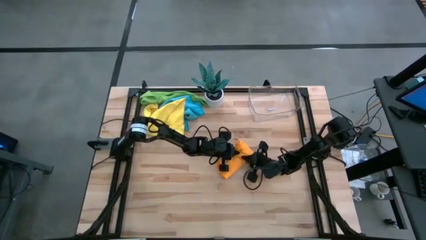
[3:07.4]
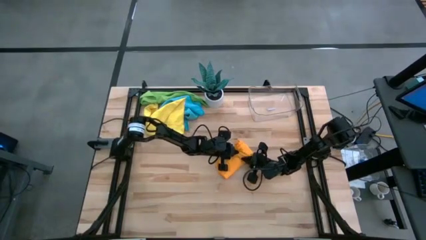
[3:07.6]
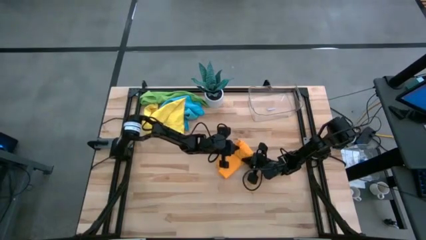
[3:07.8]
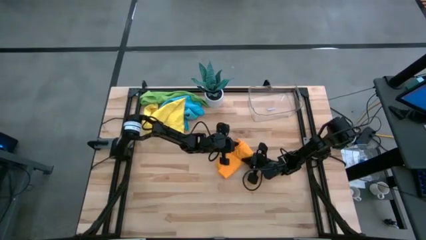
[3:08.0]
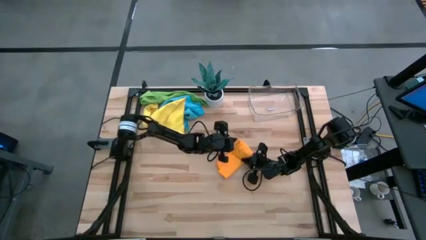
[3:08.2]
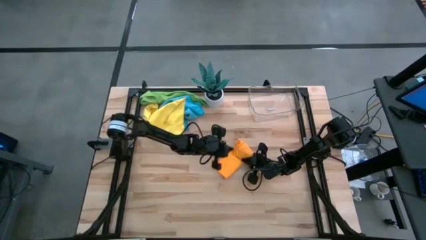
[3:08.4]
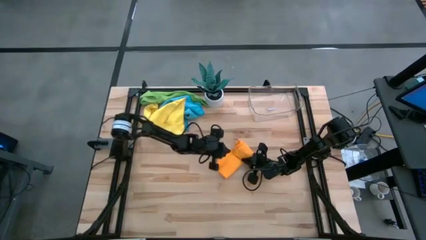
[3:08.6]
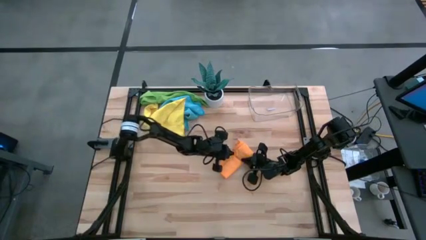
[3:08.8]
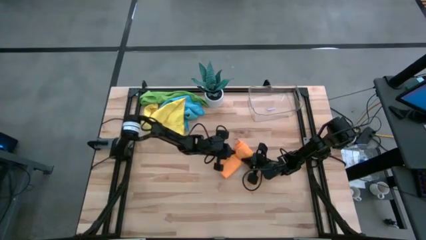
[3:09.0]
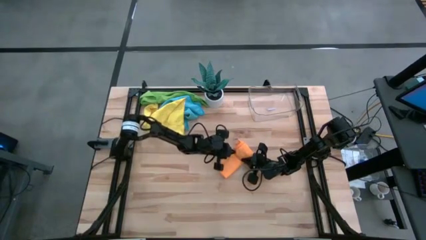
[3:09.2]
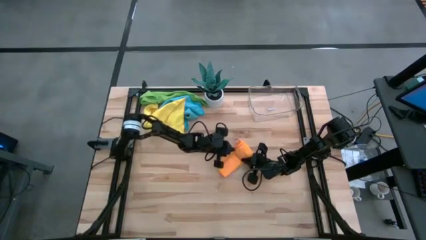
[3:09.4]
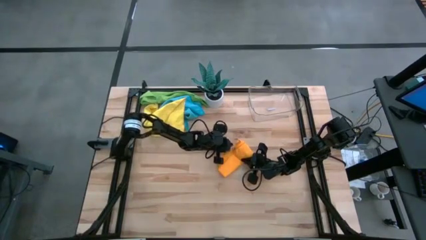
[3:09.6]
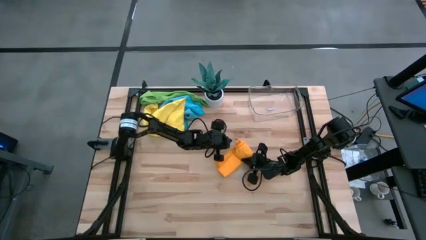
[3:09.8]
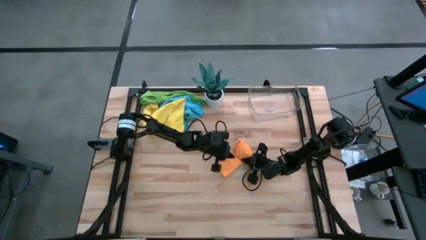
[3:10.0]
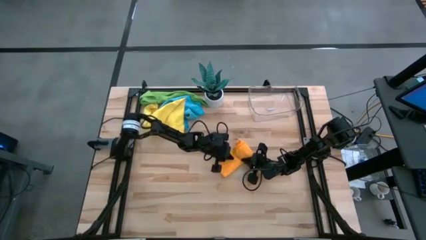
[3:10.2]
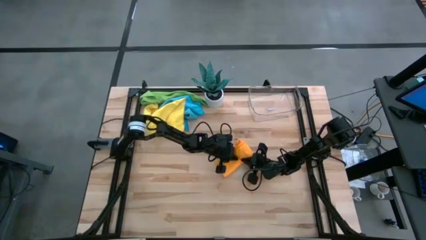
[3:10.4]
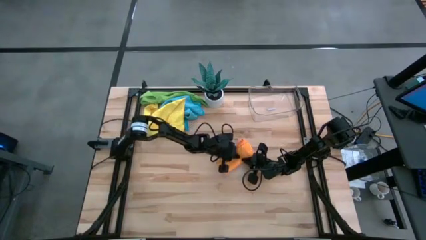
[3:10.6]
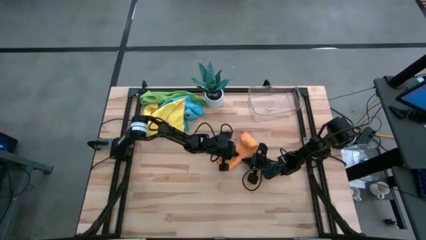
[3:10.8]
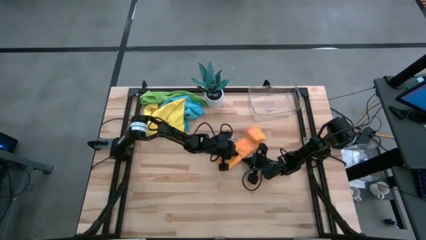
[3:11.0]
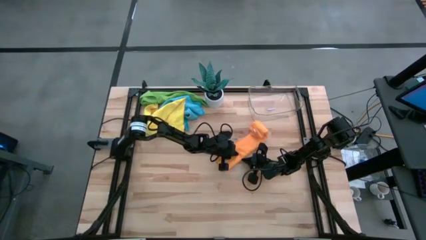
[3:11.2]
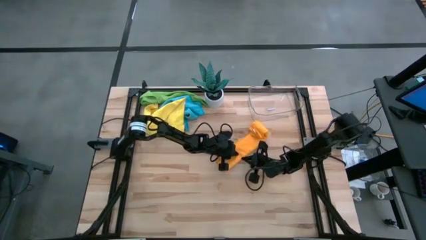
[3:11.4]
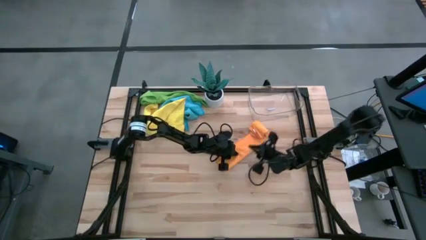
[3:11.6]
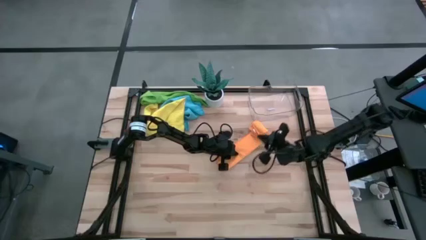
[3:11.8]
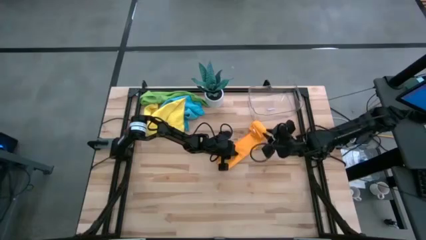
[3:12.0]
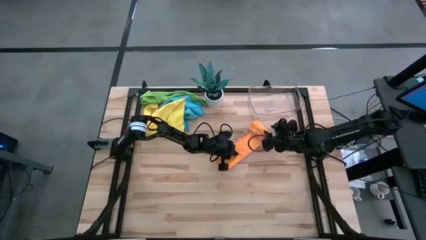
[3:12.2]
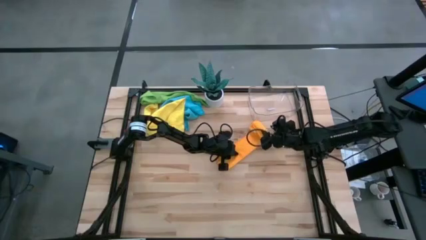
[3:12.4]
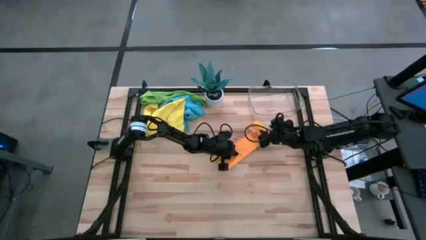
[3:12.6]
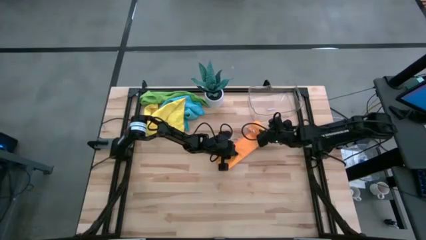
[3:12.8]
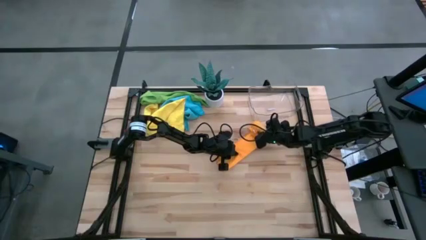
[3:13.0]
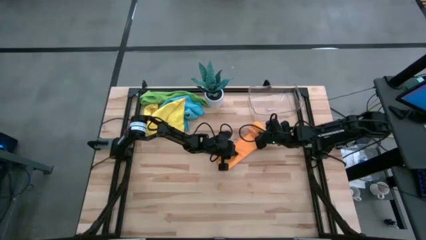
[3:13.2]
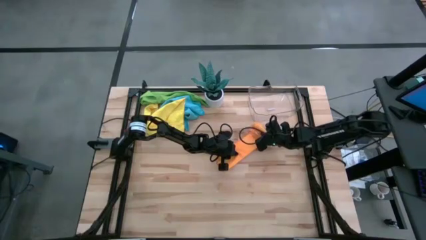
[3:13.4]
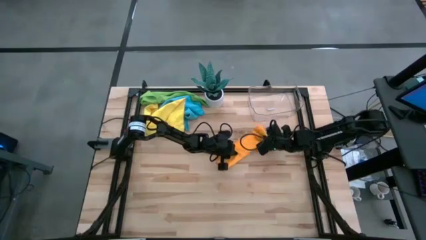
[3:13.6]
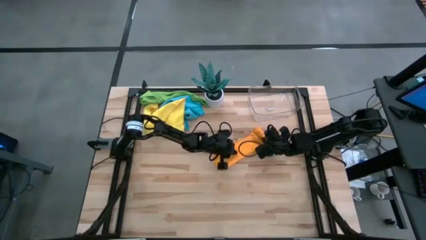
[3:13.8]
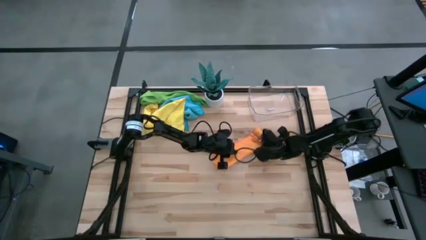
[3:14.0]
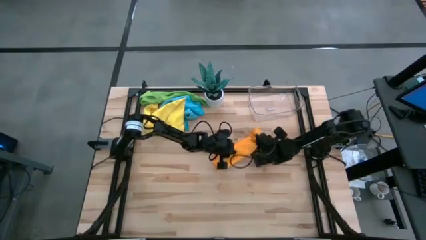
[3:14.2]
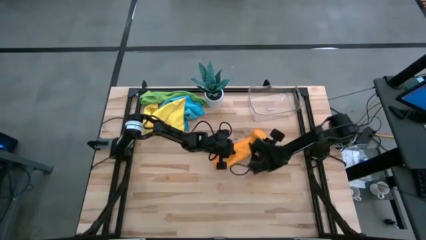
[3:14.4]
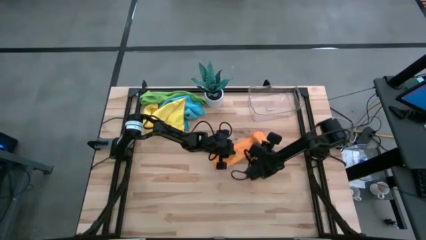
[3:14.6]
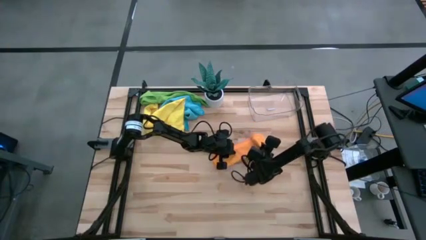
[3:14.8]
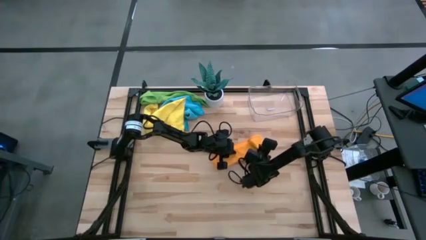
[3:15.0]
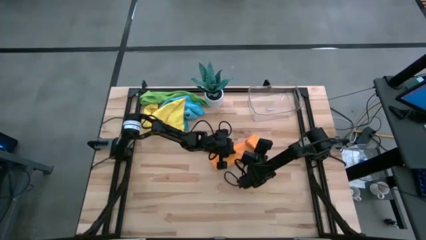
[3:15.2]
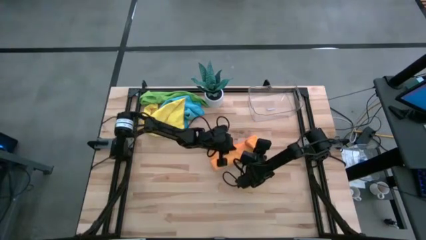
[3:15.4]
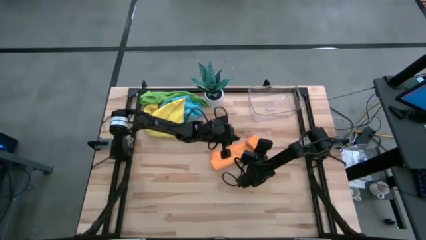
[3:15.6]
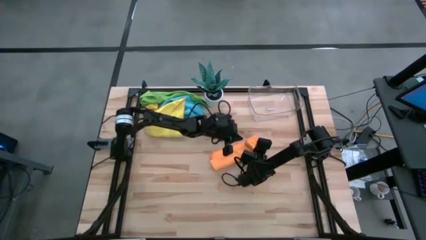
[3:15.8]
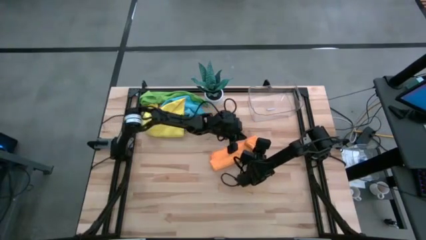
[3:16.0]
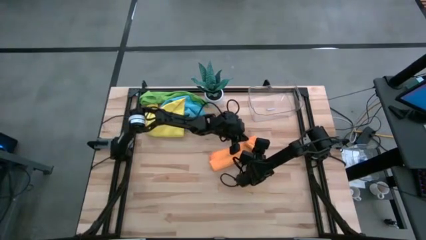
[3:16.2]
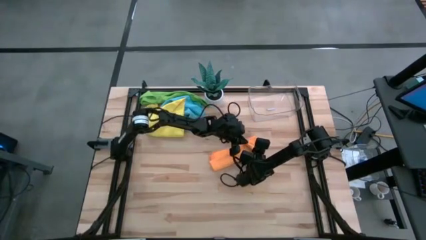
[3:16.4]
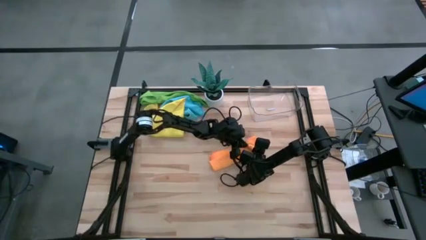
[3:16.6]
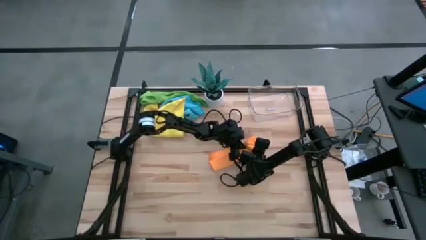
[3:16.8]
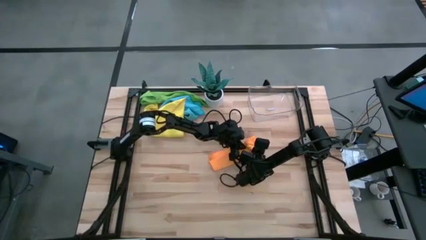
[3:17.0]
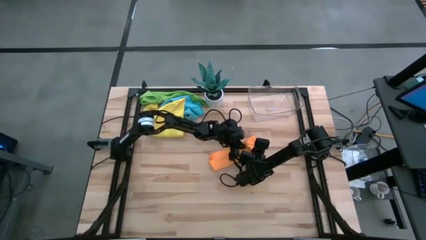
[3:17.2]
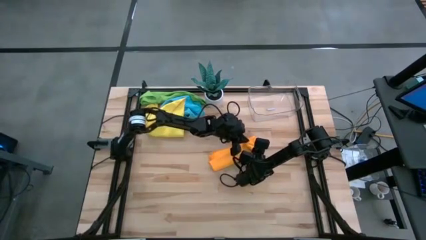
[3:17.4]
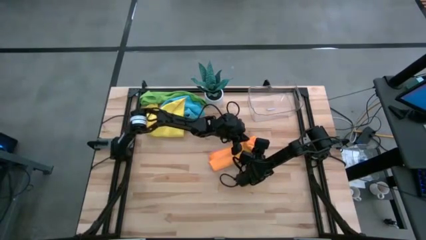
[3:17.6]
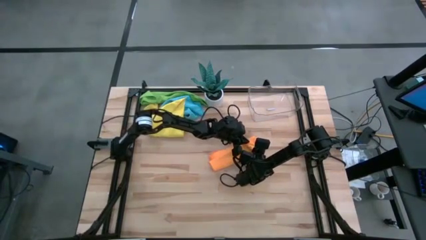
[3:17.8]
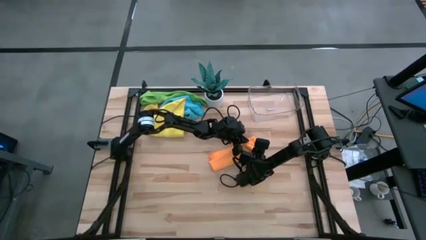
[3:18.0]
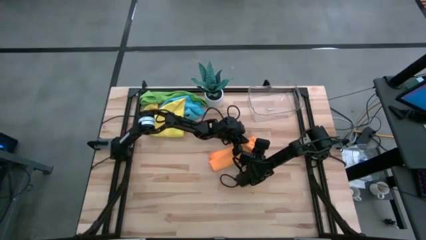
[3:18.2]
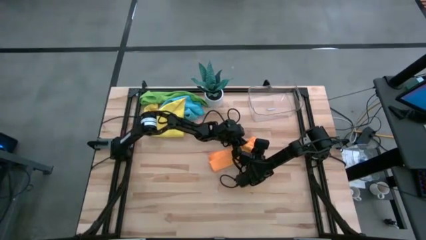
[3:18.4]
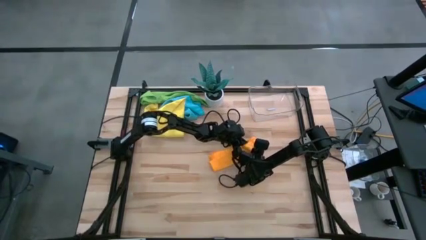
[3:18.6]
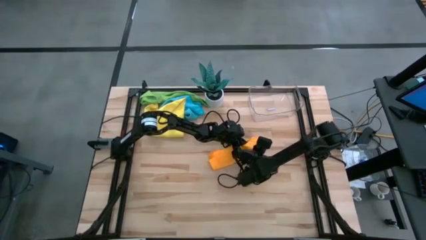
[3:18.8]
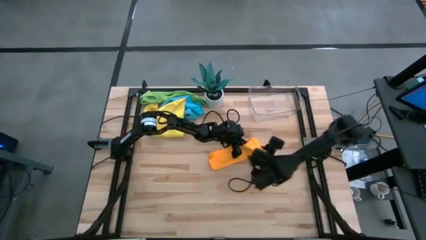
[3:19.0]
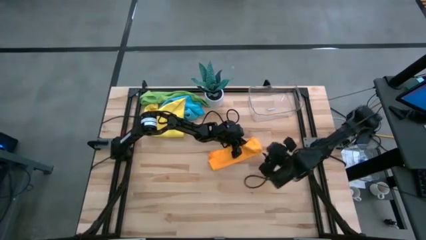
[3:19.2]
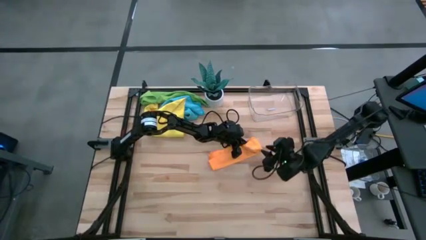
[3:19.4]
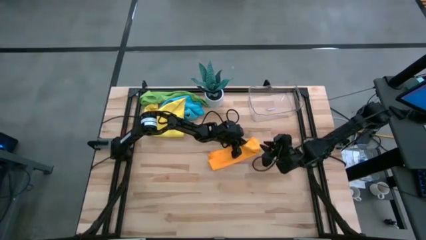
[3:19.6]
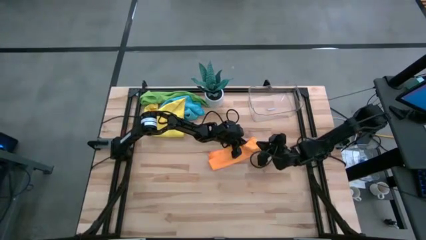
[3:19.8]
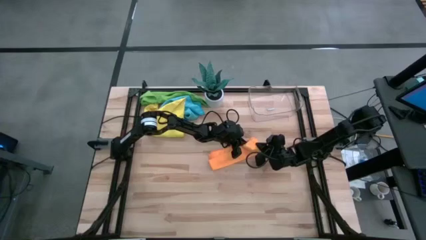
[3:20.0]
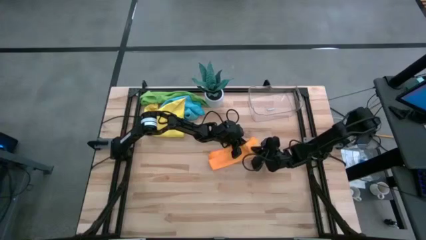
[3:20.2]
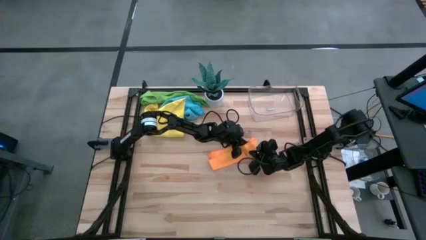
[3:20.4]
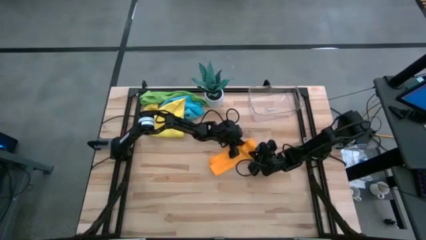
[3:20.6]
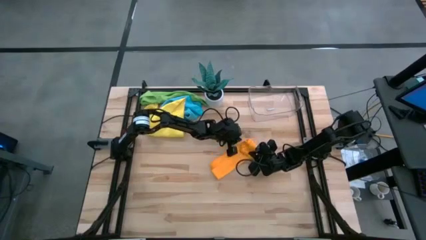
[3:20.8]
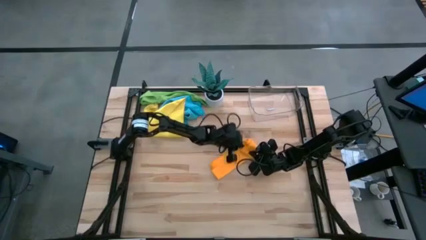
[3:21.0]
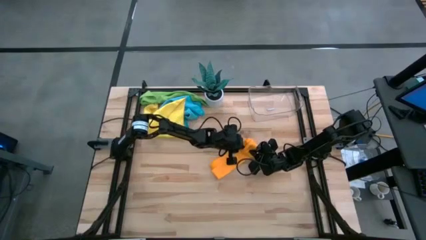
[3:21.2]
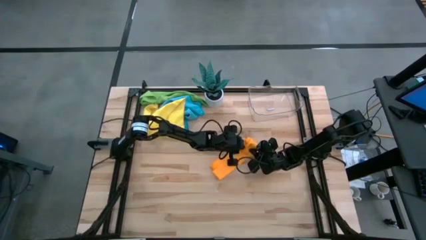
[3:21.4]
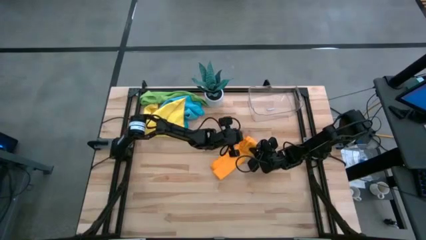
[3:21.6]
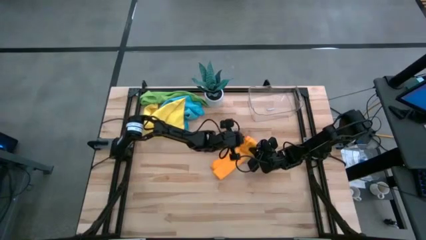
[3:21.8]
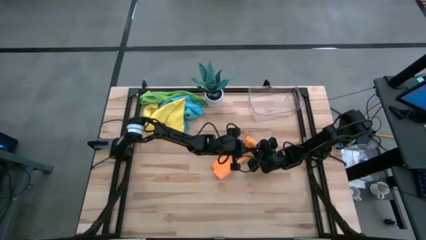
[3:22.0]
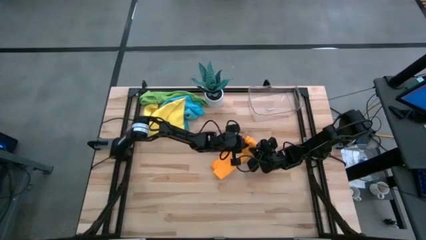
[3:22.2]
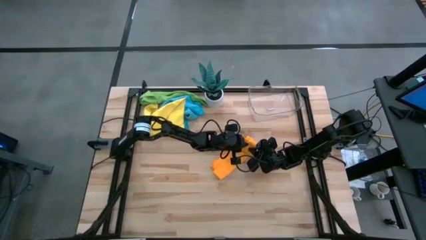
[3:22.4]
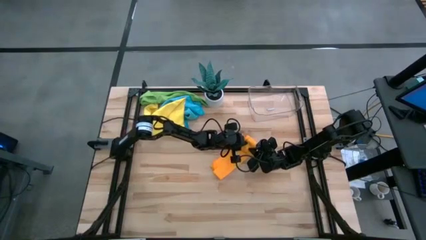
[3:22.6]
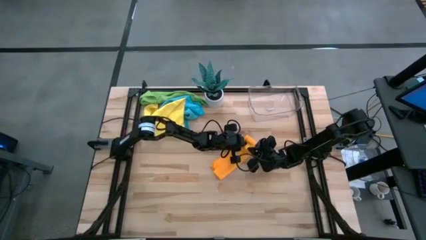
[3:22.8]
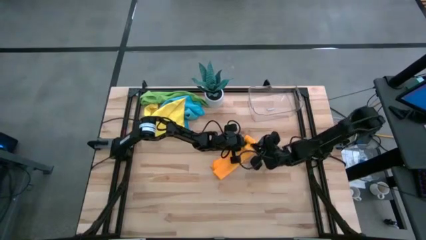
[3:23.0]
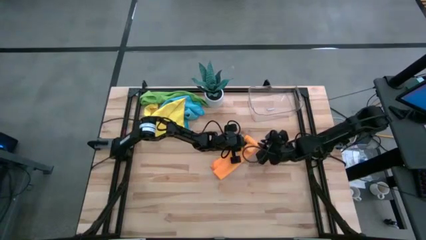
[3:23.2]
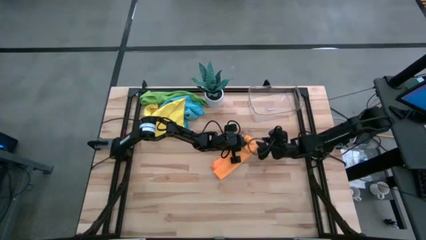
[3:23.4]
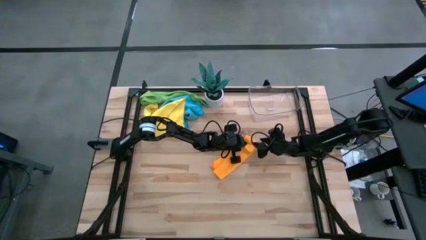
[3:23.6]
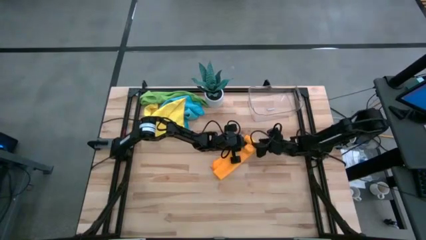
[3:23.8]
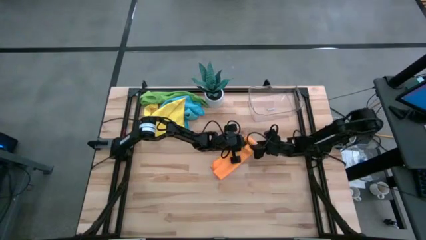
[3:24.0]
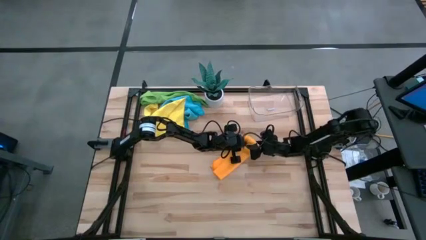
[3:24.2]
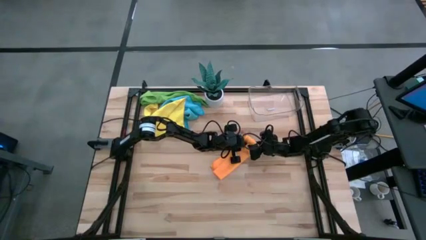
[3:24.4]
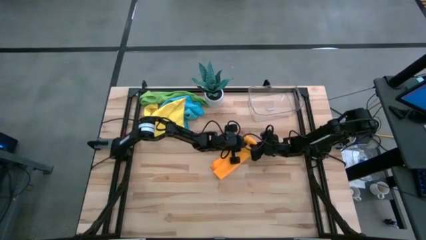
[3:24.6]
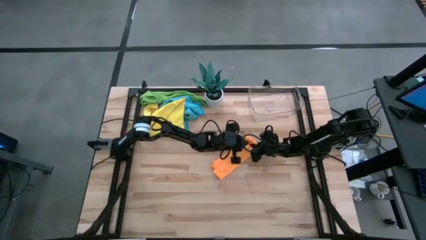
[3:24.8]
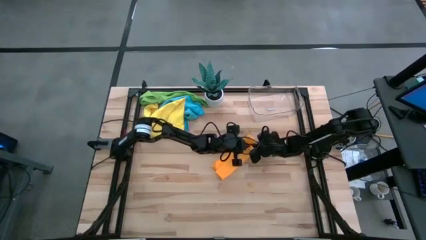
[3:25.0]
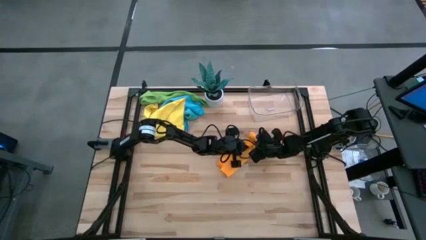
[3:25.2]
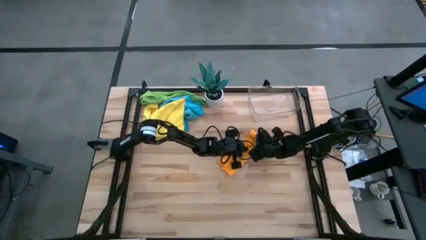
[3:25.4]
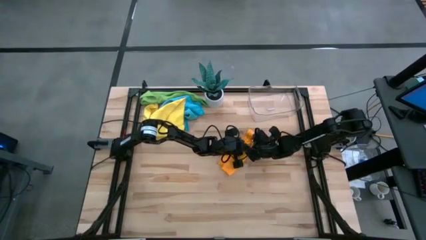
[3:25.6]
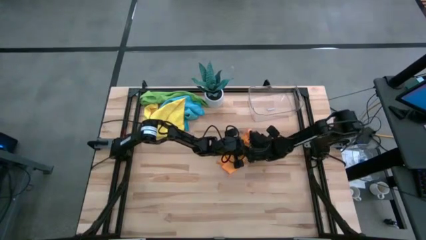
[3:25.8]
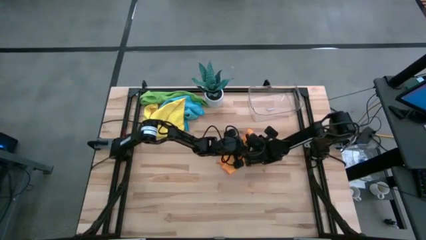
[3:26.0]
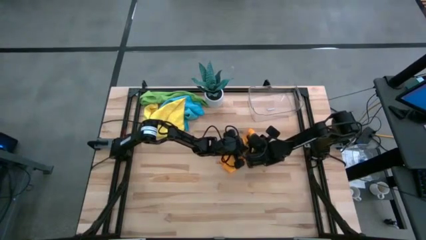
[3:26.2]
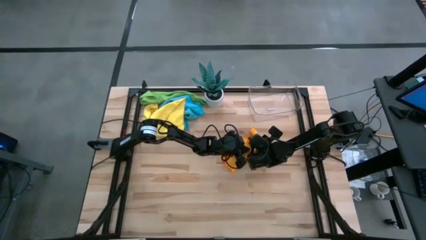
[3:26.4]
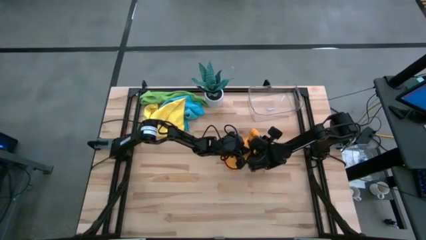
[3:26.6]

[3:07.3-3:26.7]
Task: Roll microfiber towels into tight, uniform cylinder then place into a basket
Roll the orange microfiber cloth
